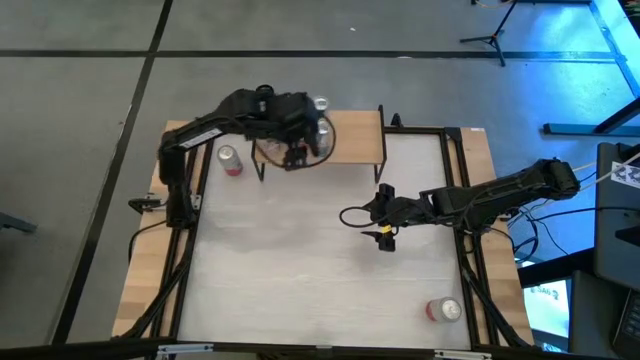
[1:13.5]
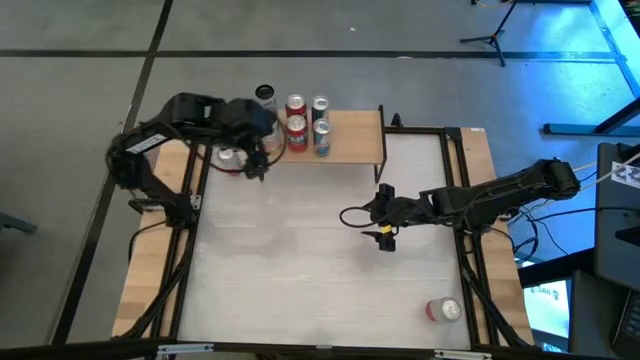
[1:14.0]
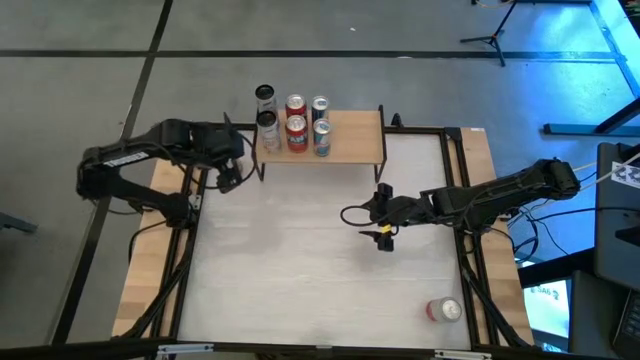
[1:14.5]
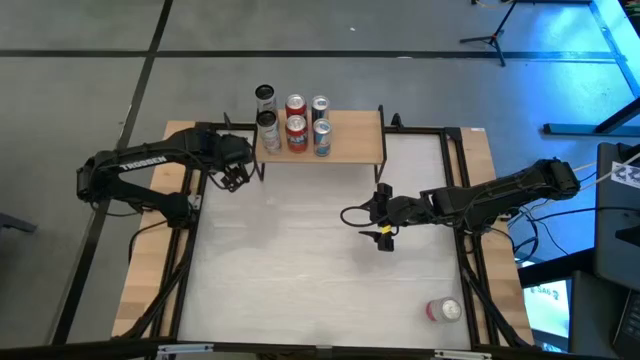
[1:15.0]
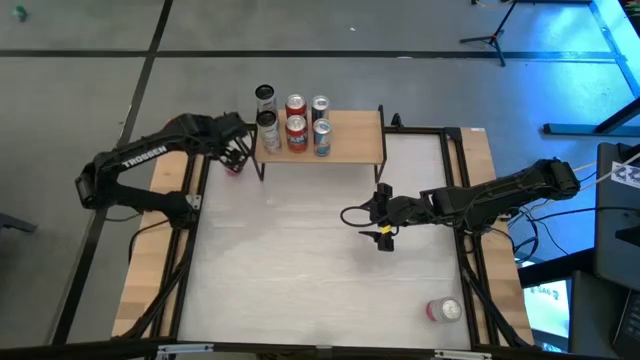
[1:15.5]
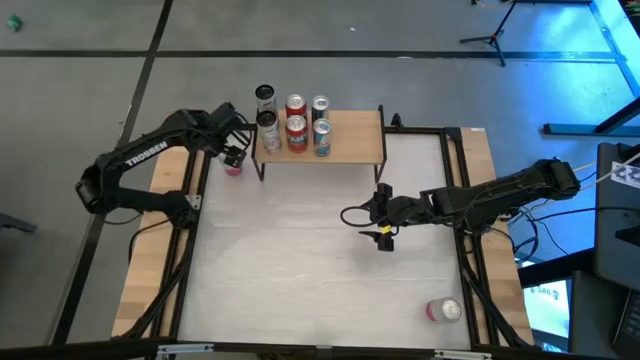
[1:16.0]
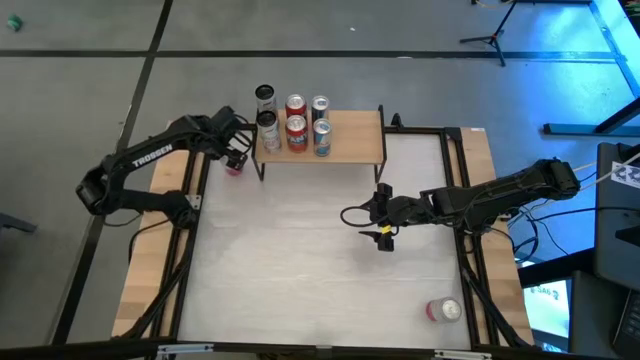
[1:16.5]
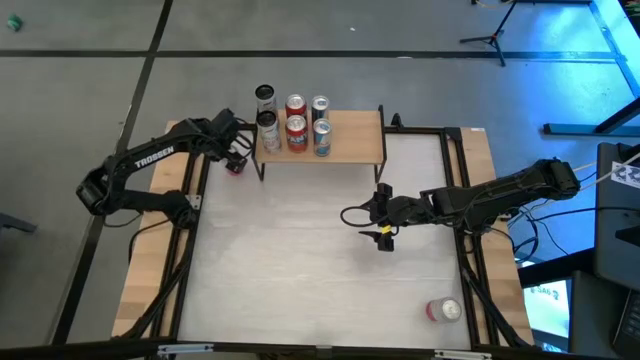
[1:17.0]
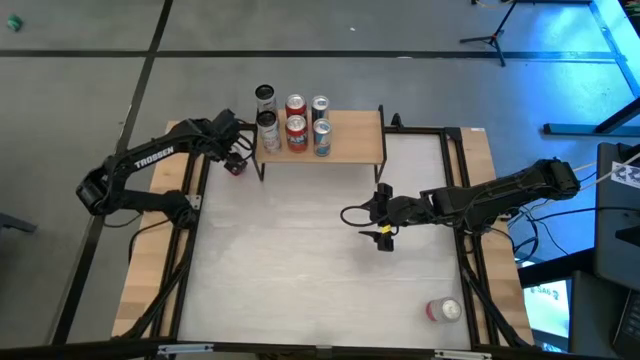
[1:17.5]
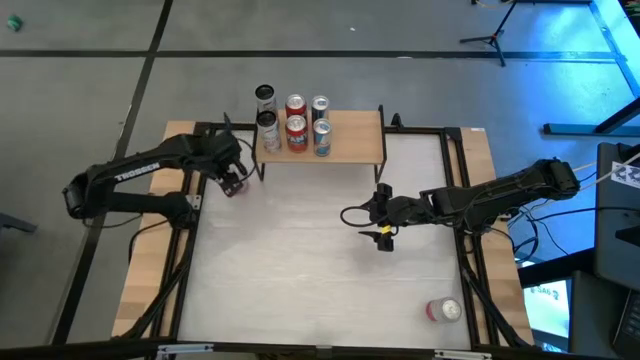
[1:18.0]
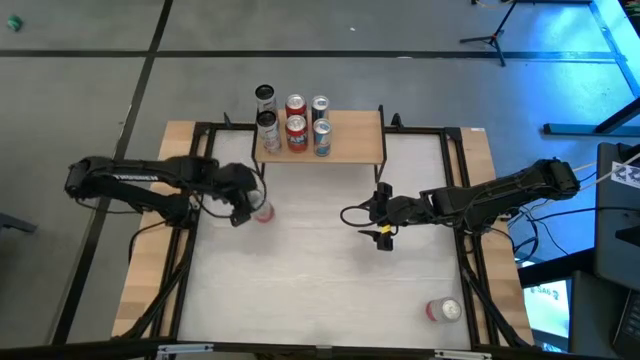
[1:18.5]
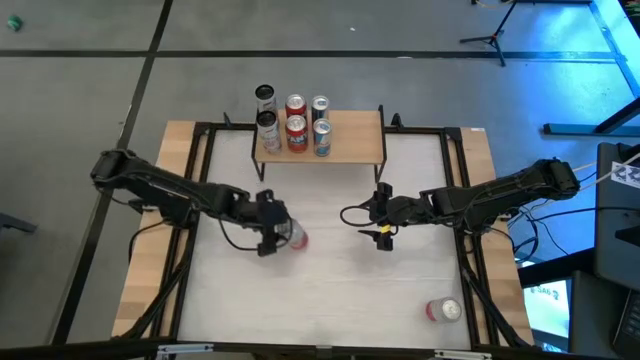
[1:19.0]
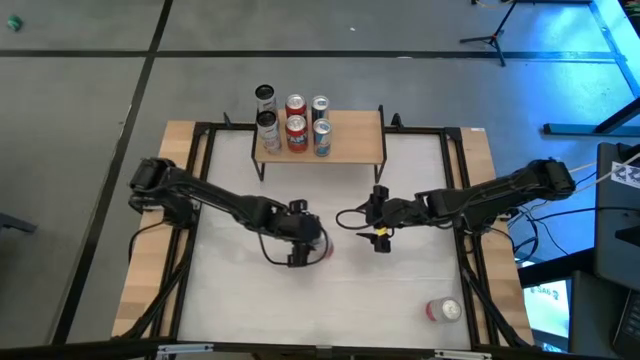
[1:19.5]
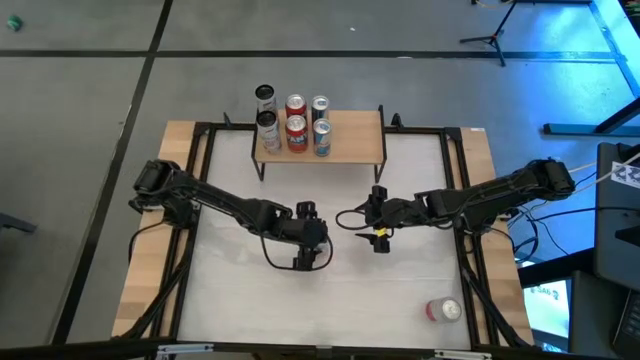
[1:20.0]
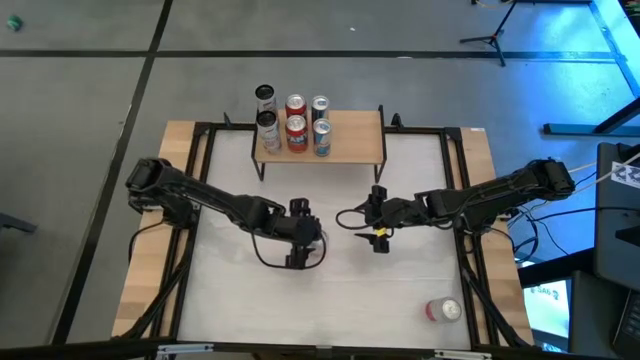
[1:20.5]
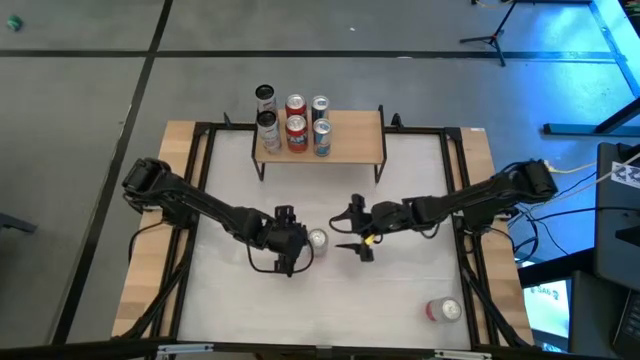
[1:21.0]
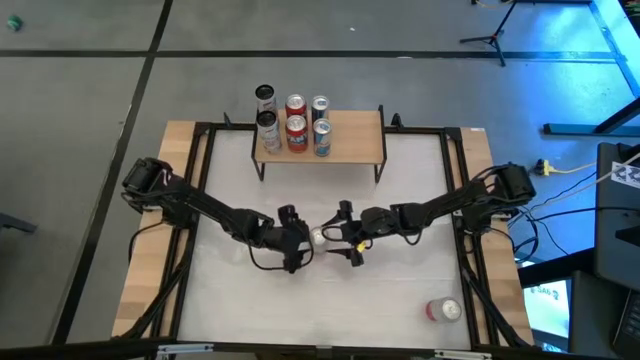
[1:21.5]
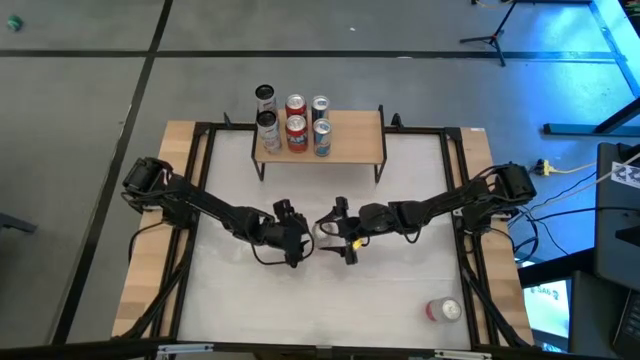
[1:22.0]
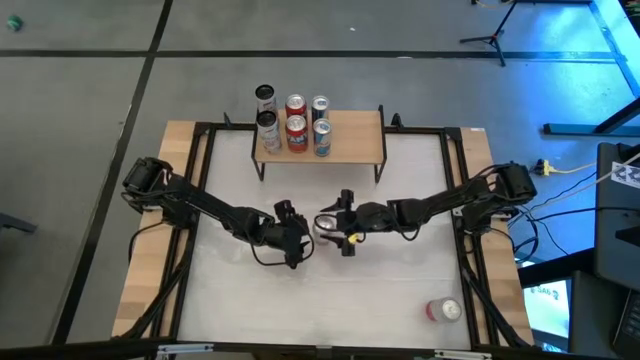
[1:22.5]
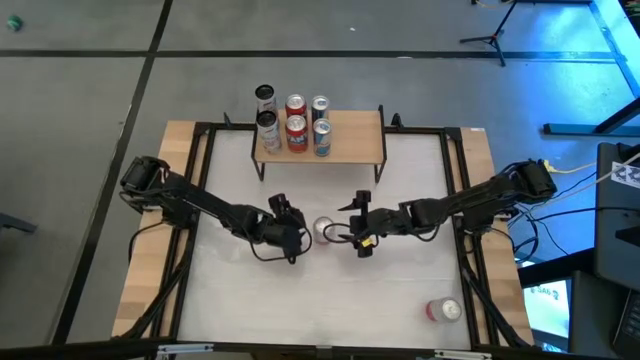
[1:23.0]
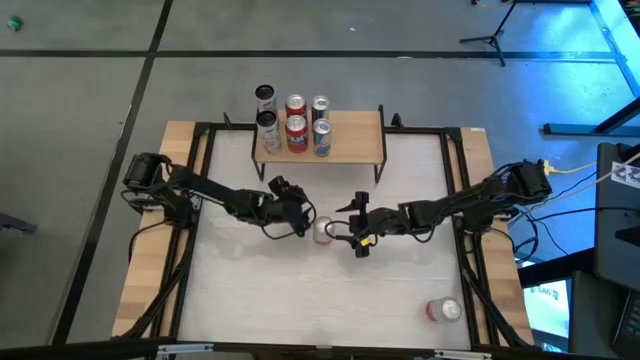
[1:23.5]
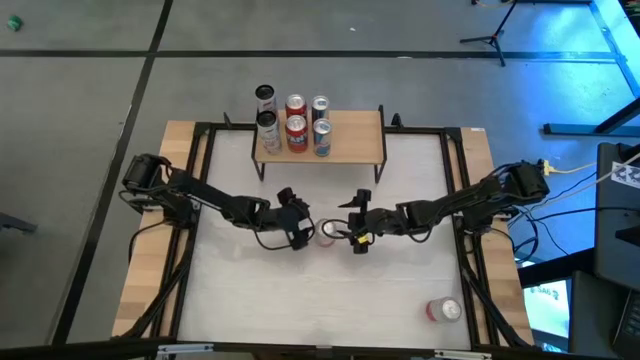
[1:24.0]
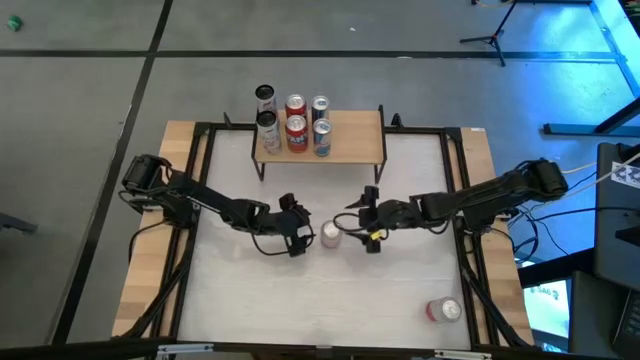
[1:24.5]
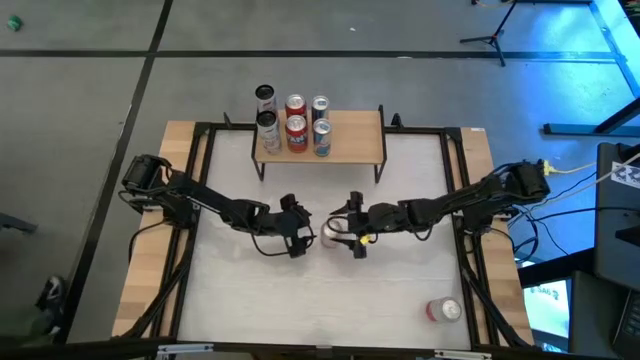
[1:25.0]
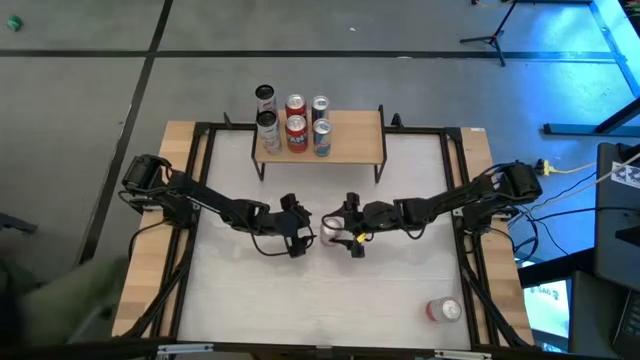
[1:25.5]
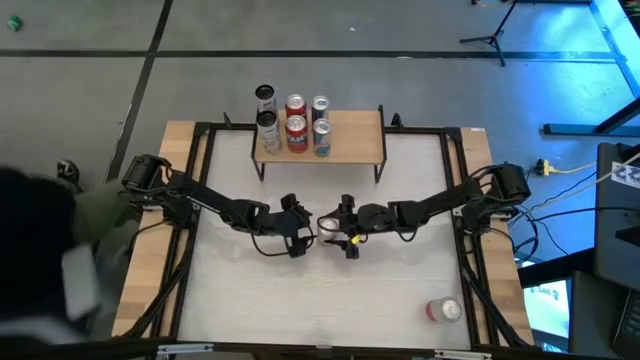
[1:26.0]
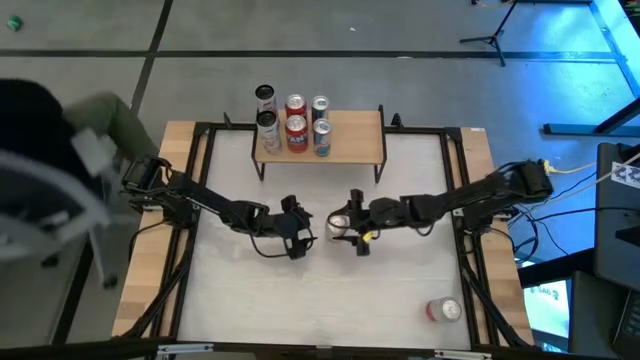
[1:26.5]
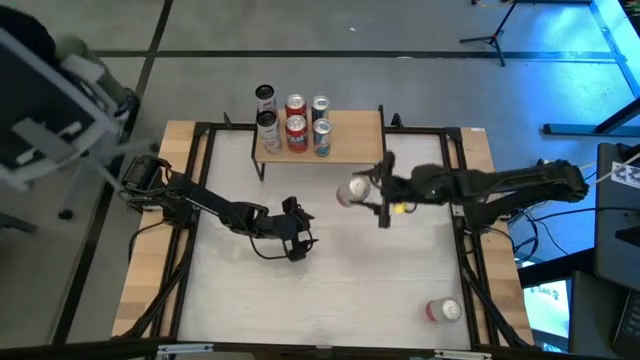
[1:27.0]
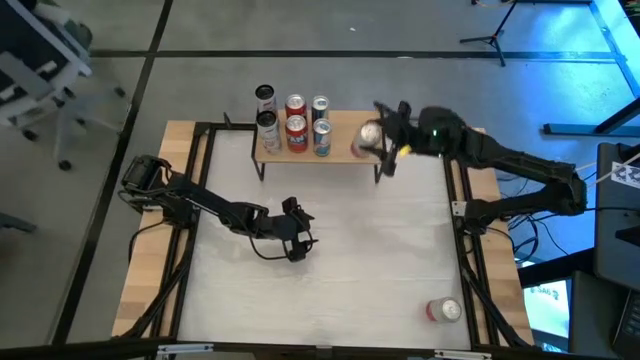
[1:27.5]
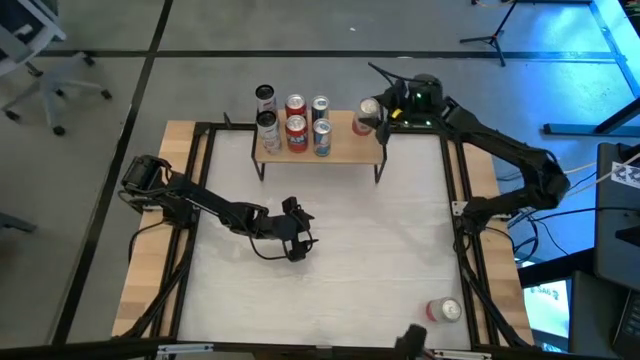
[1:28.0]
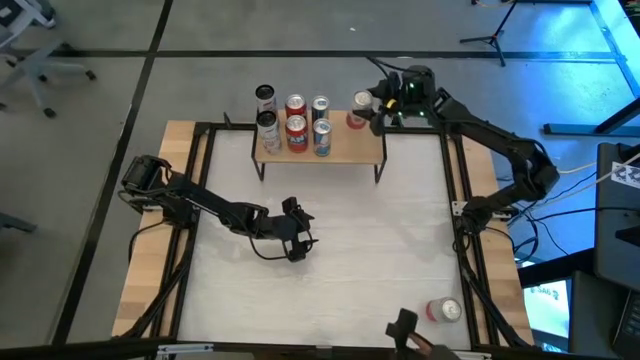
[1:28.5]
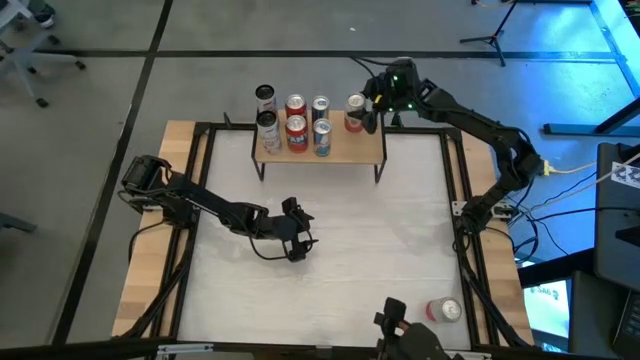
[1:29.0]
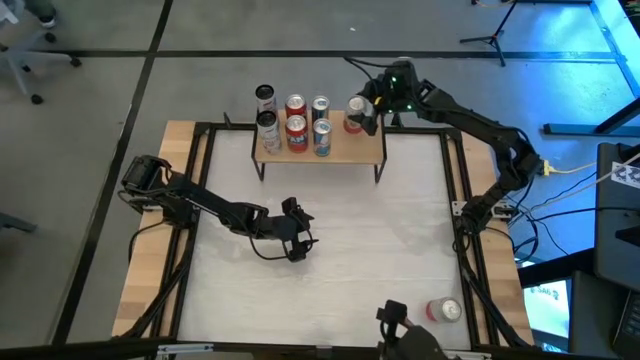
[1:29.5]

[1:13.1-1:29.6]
Task: Place canned beverage on shelf
Put the right pink soda can on the shelf

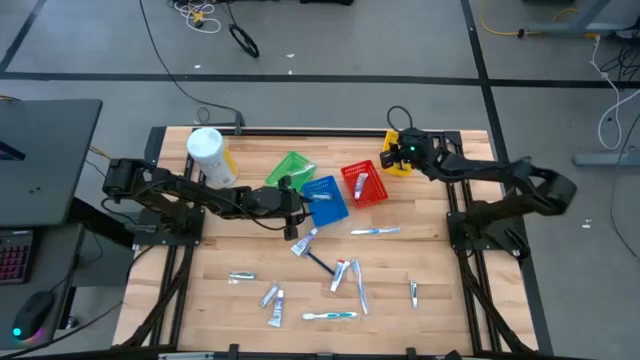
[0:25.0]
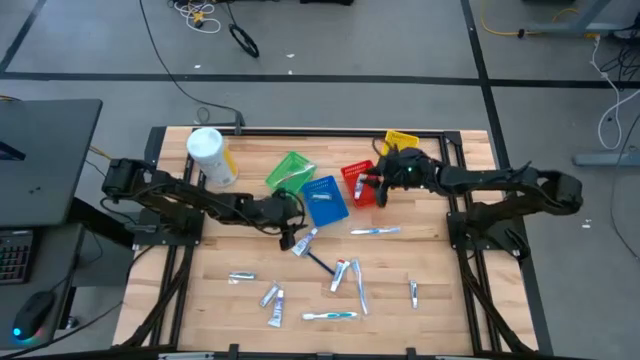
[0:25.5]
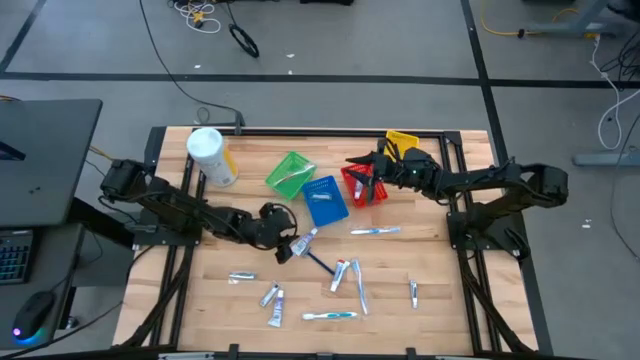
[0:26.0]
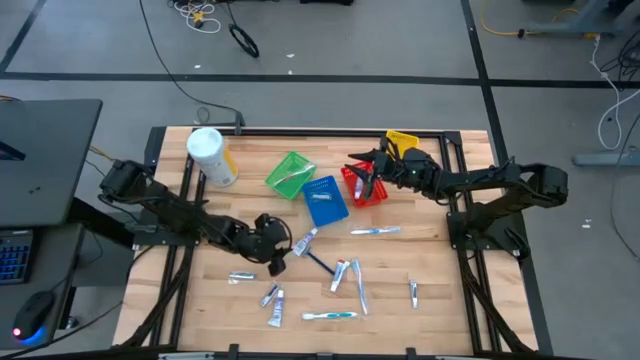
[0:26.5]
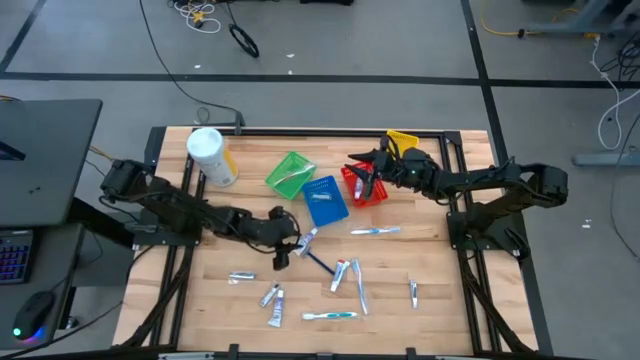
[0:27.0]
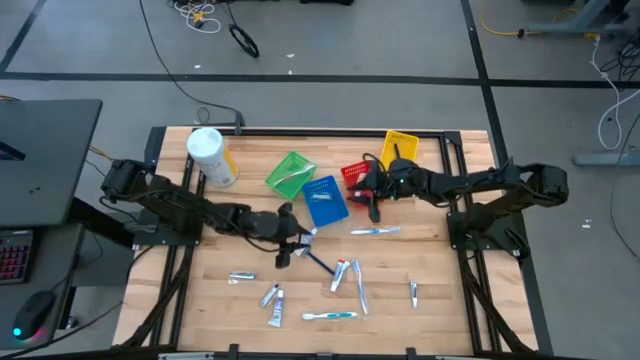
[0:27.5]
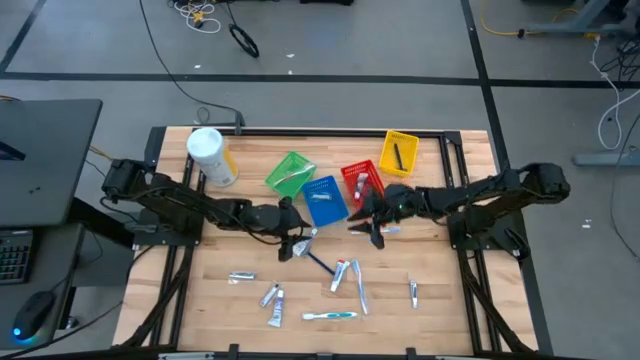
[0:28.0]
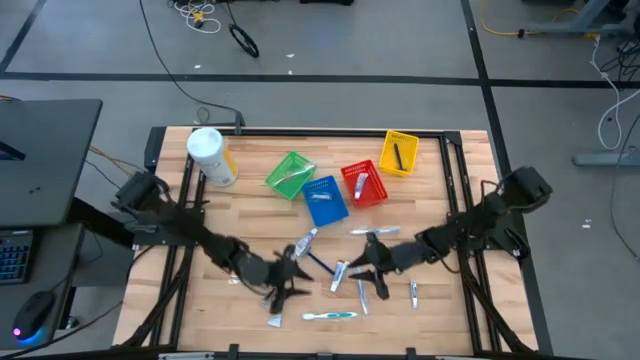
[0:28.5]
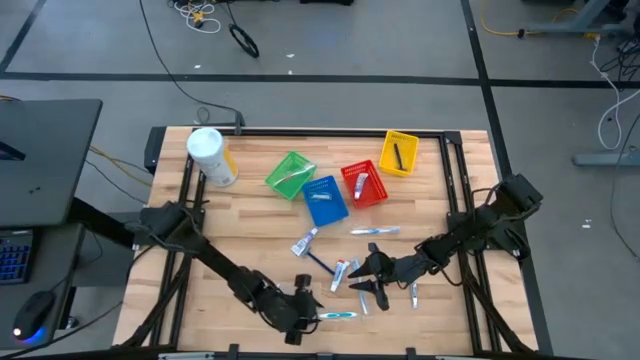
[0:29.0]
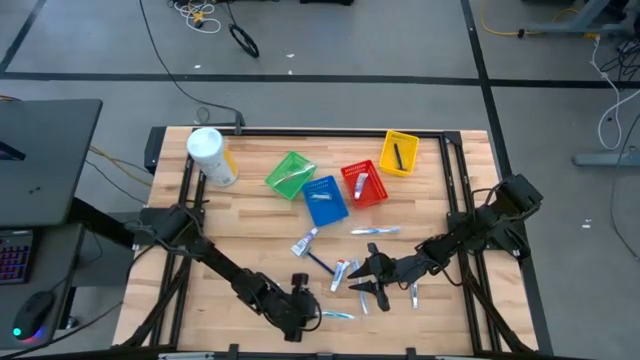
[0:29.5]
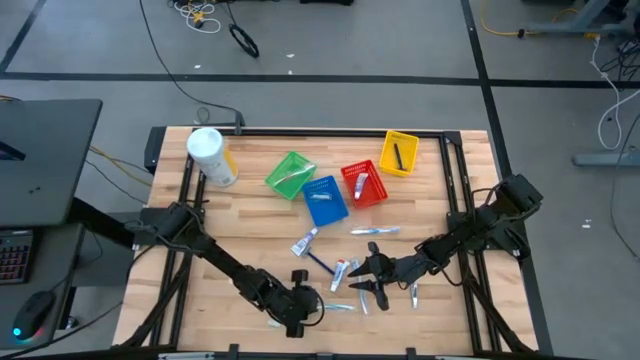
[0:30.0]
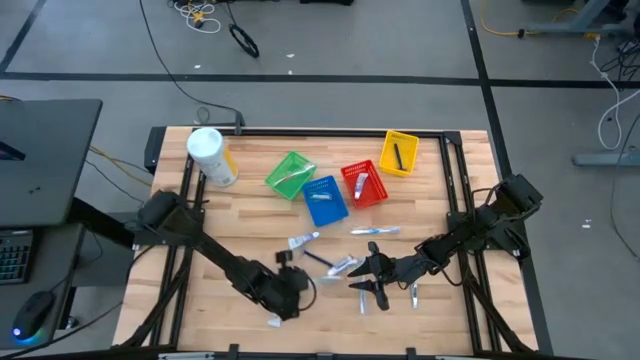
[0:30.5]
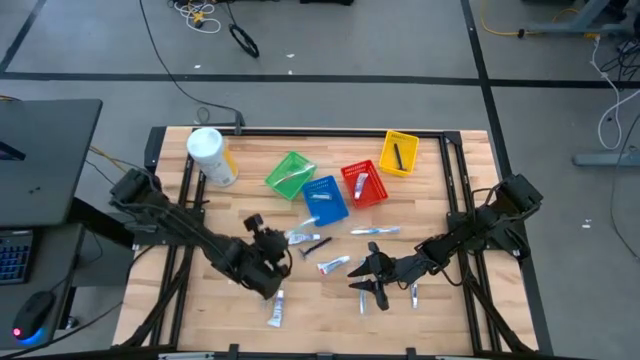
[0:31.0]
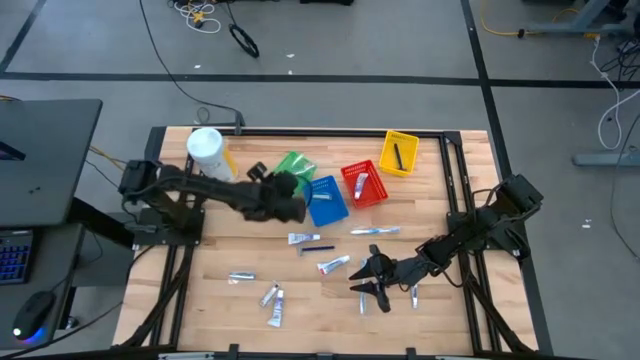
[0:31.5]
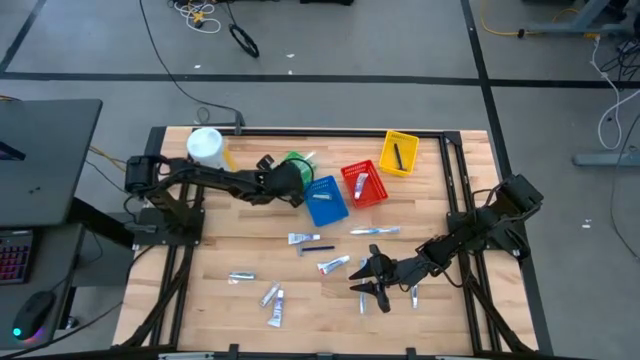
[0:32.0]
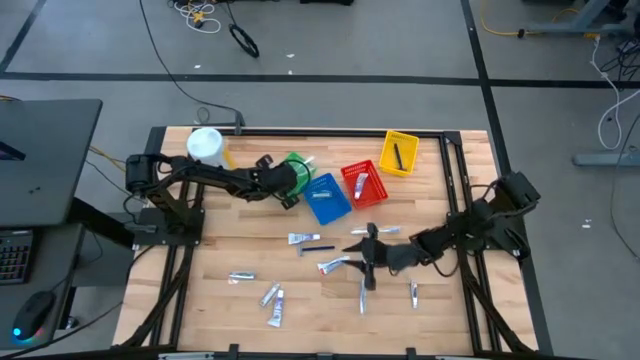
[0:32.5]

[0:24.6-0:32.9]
Task: Pick & Place Travel size toiletries
Put the green toothbrush into the green bin
